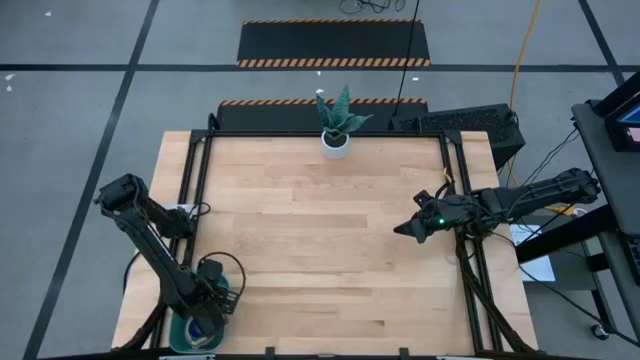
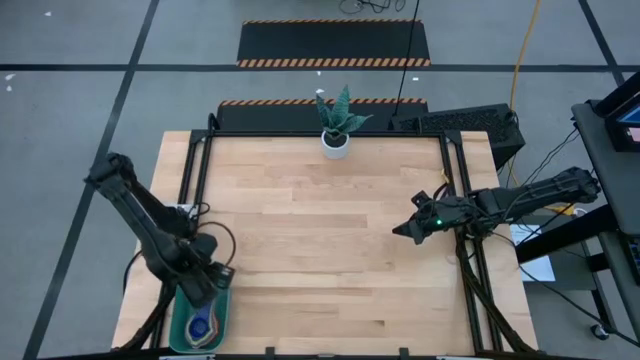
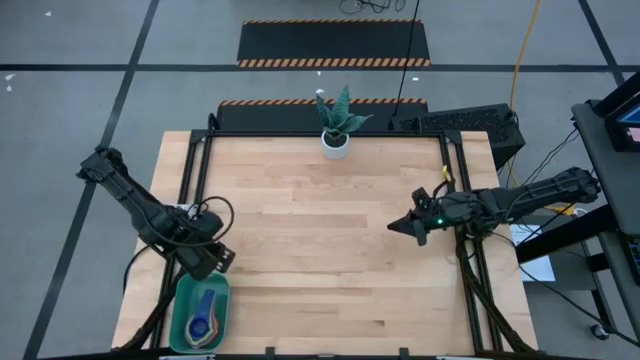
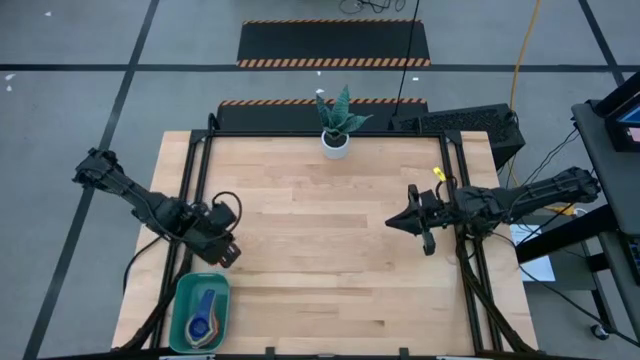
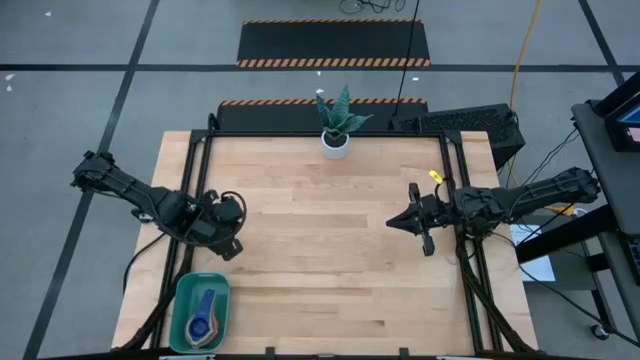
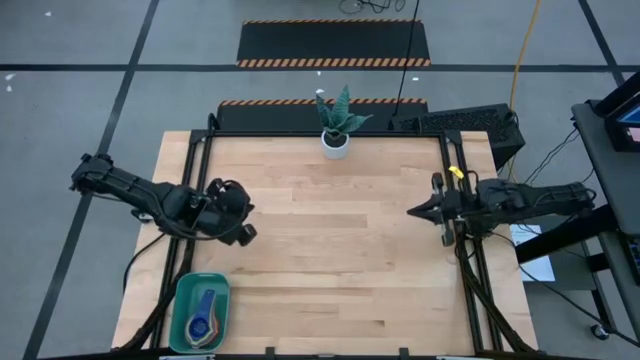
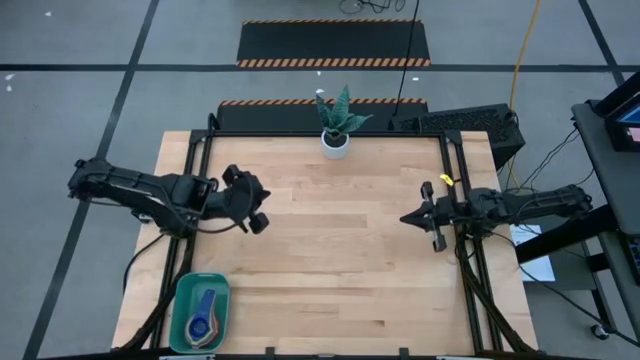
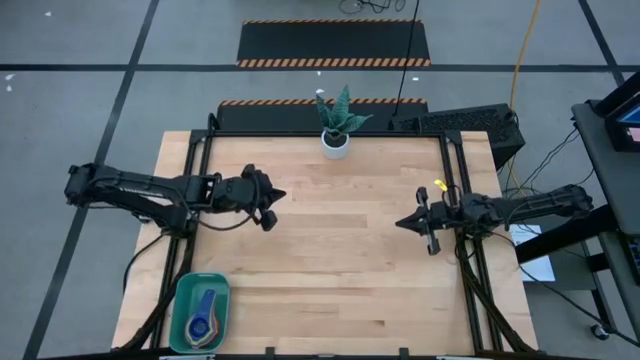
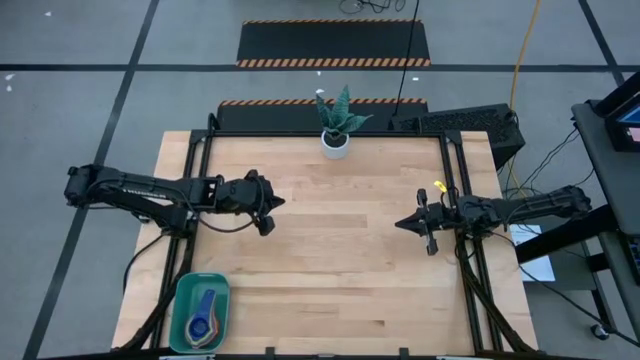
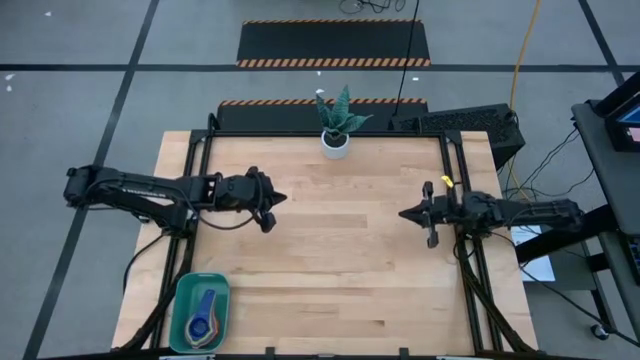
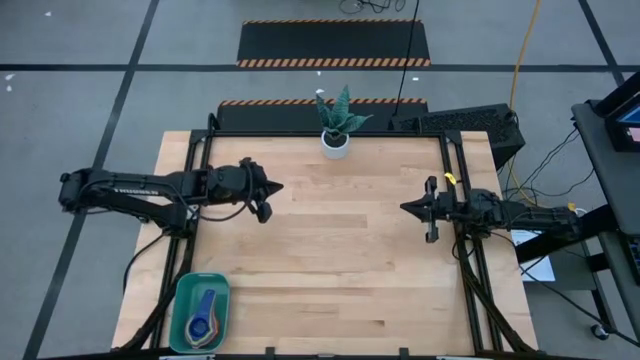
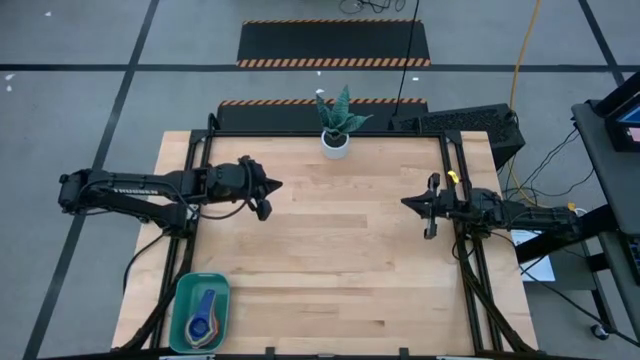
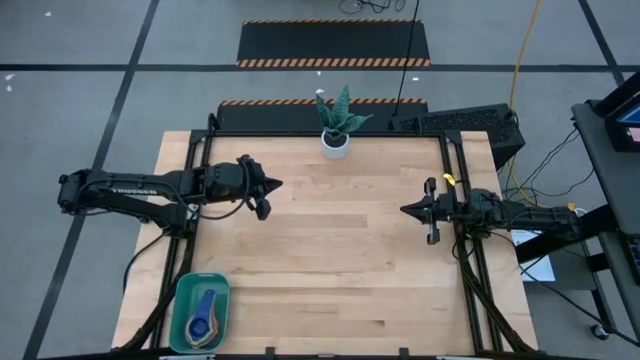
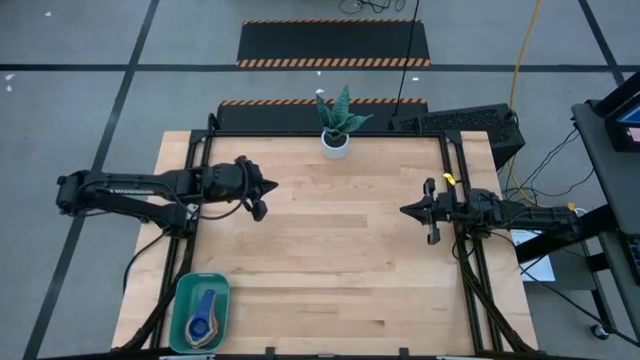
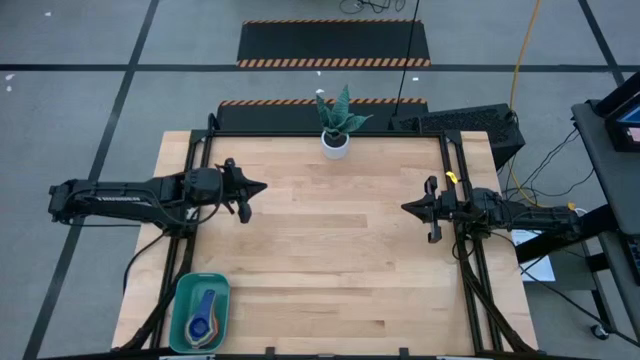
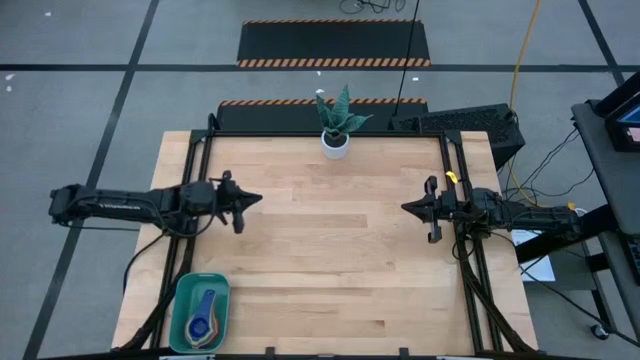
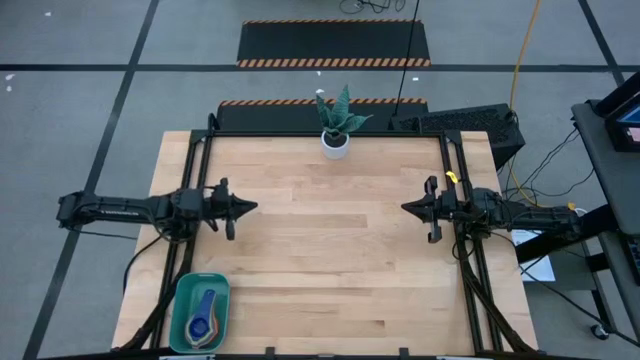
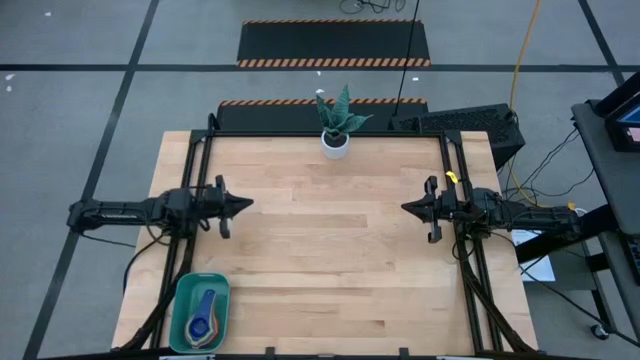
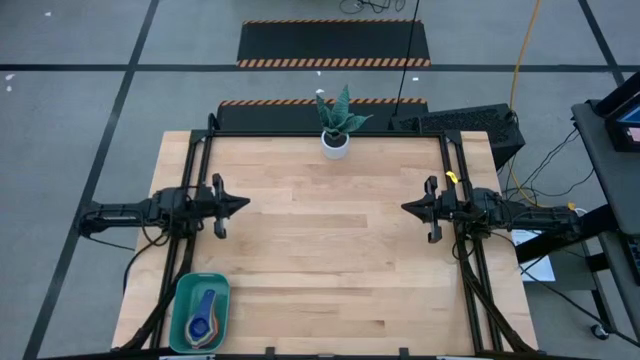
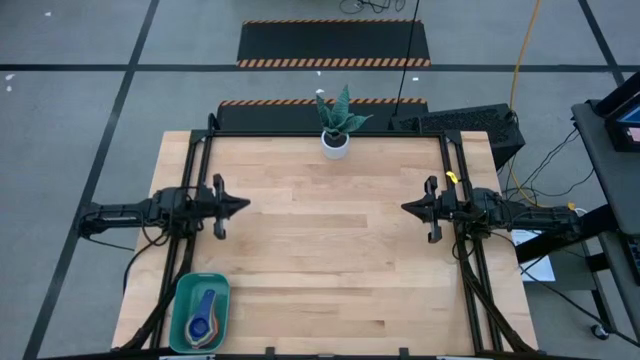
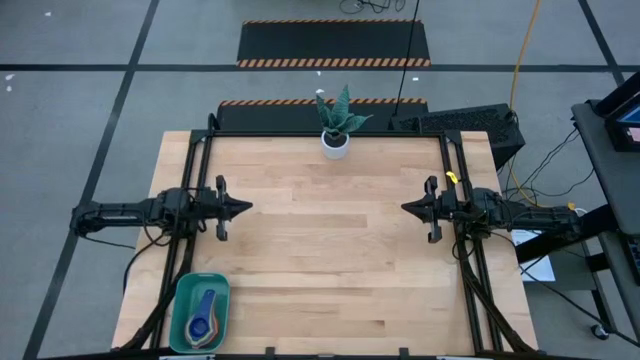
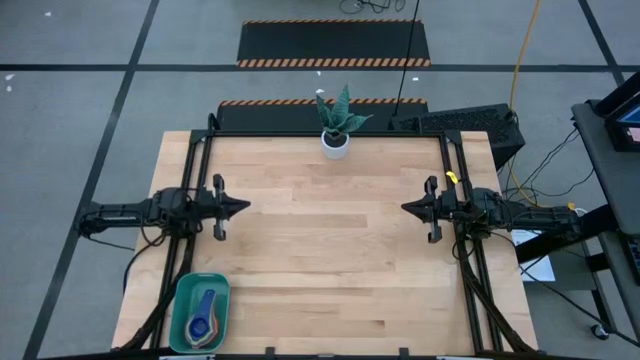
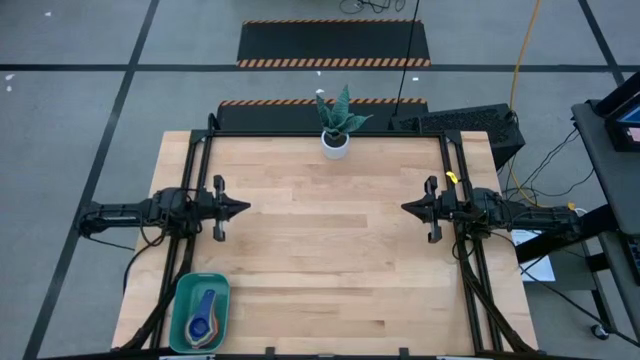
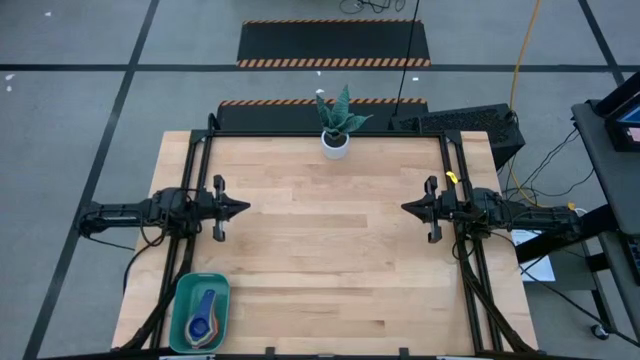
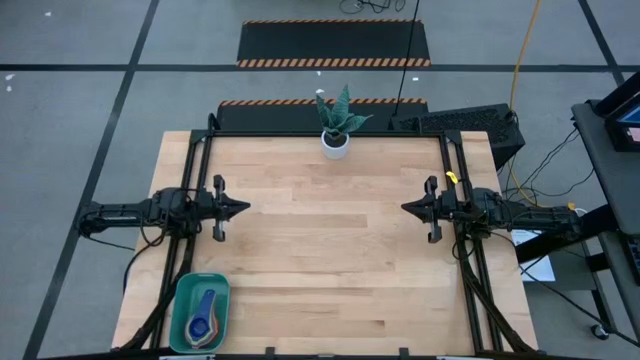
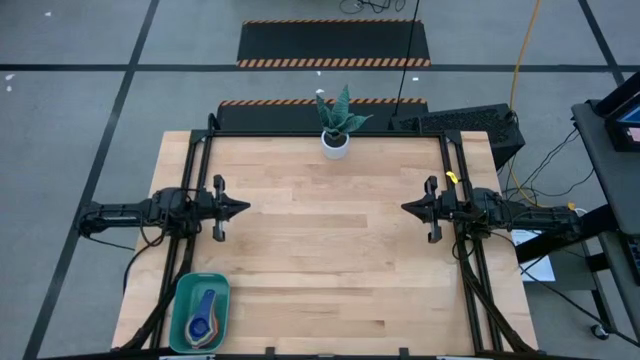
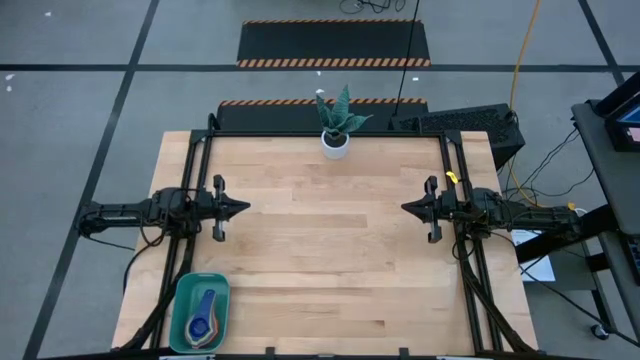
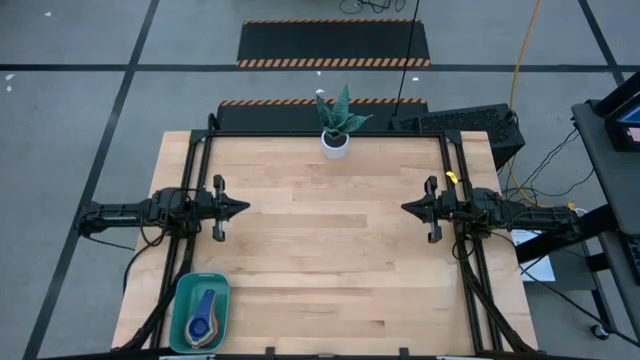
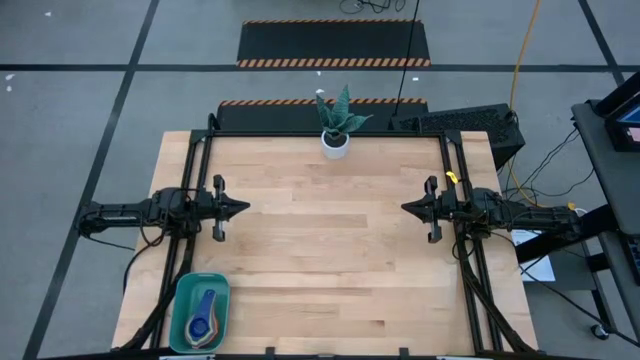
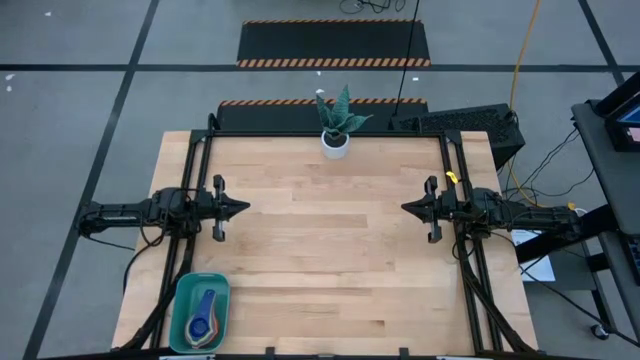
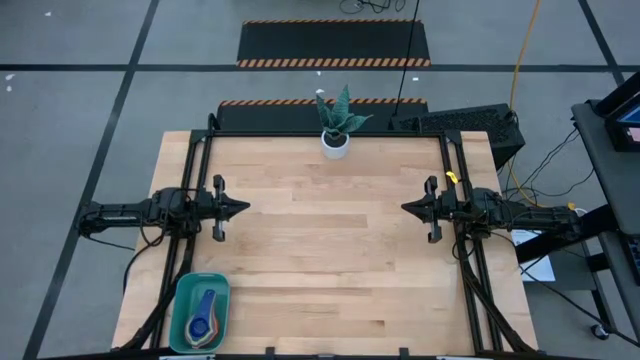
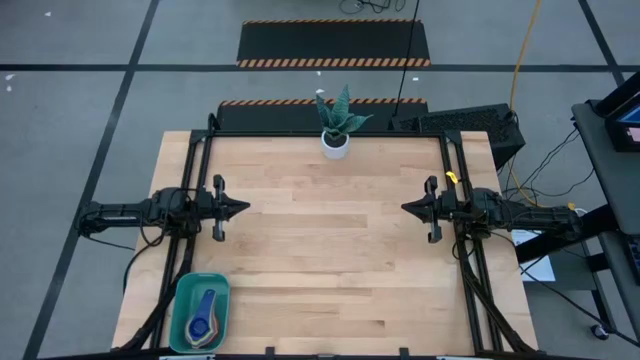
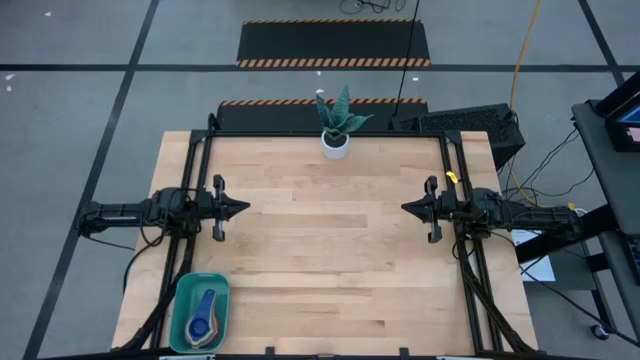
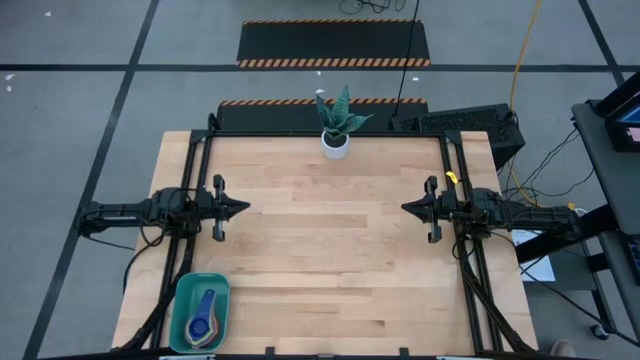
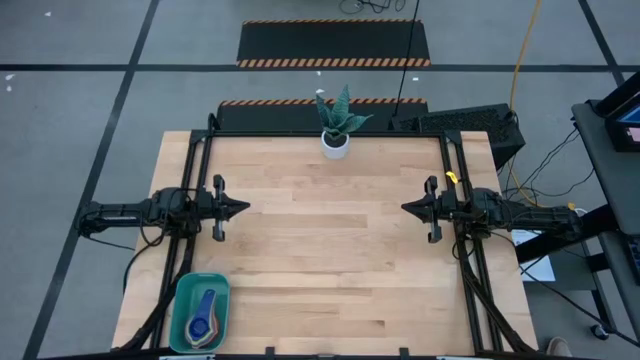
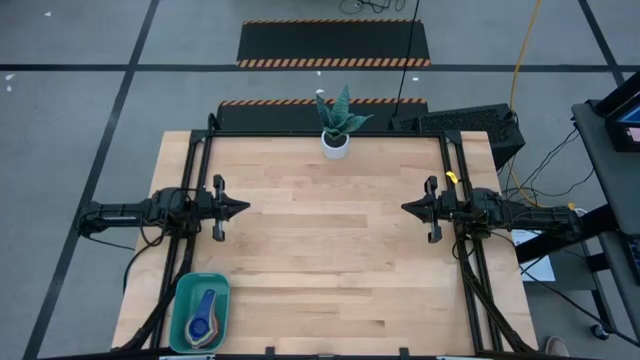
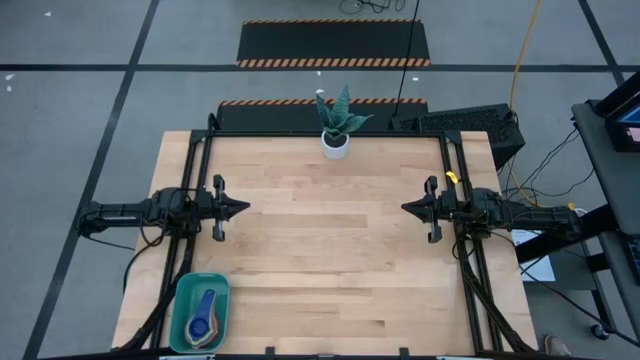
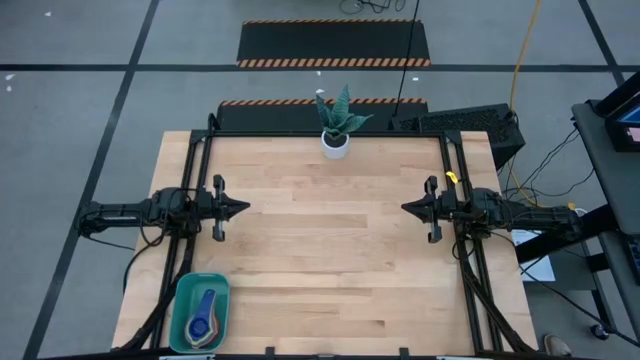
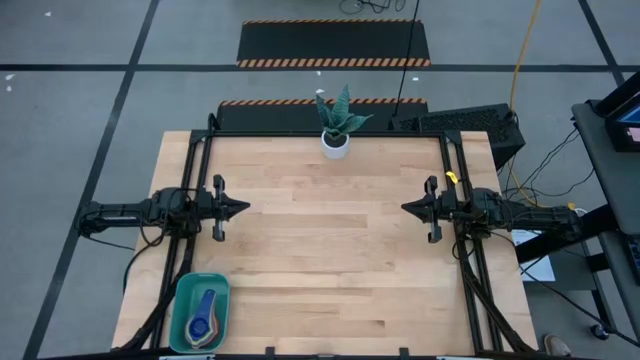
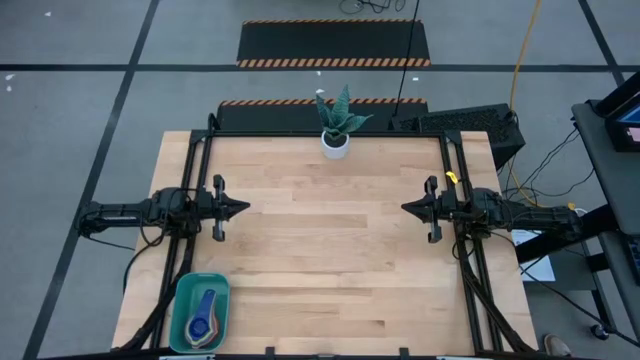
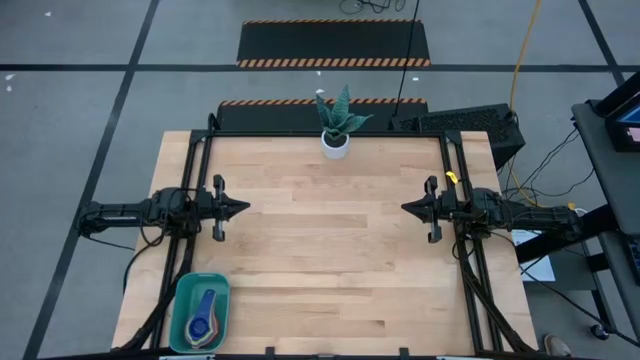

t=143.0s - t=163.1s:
Task: Nest measuring cups in basket
Return to Home Position

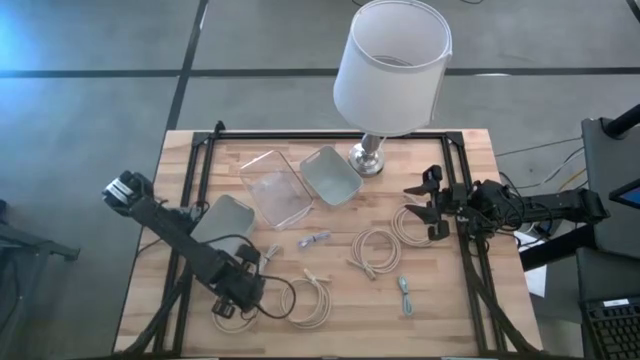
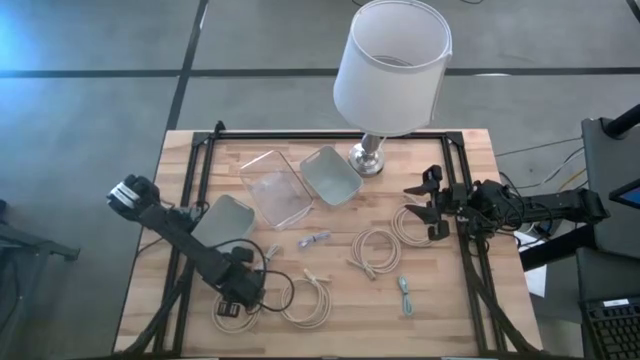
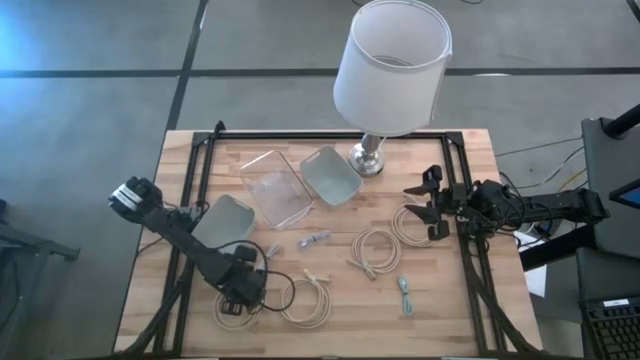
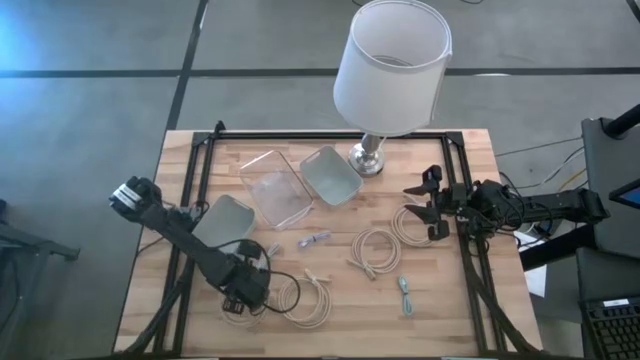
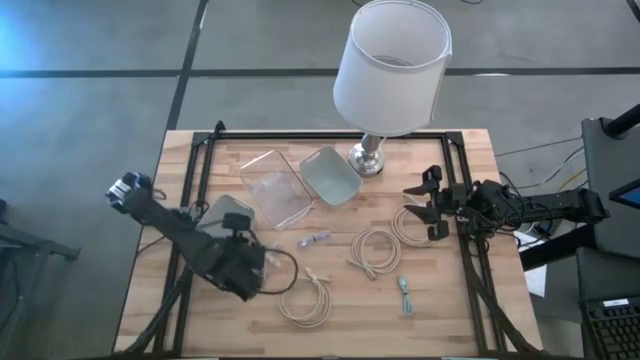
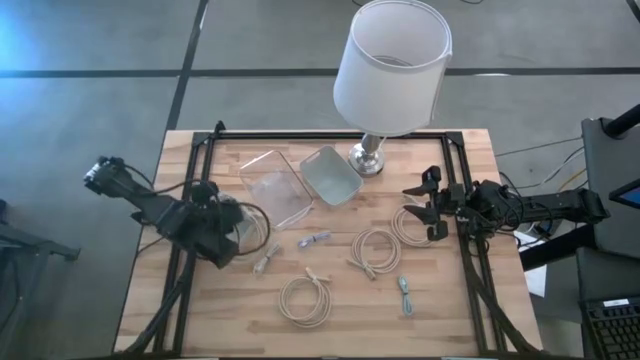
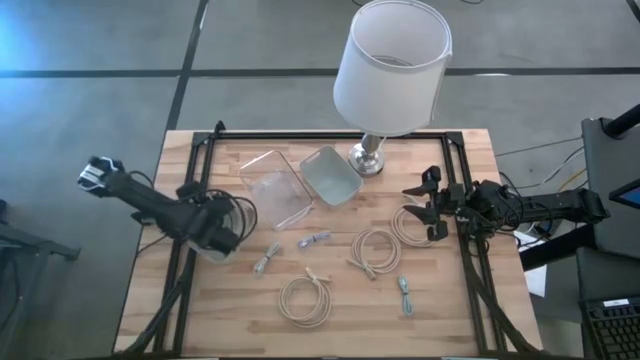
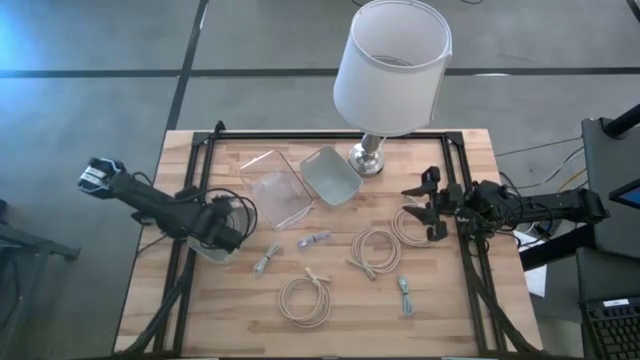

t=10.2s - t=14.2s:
Task: Pick & Place USB Port
Put the brown hdmi cable into the left gray bin
